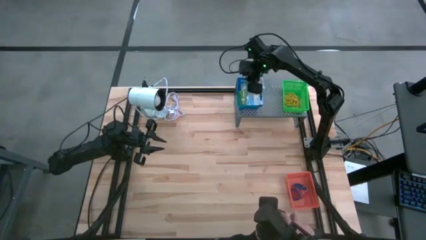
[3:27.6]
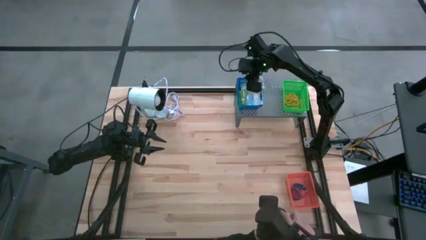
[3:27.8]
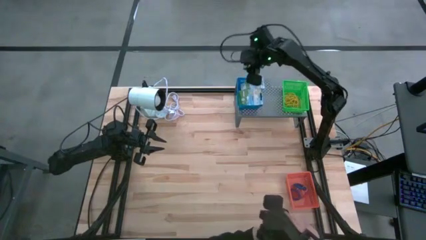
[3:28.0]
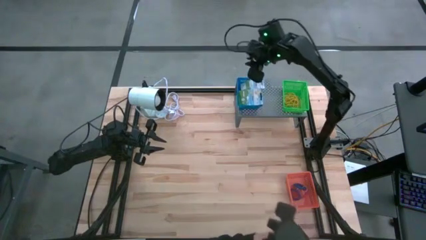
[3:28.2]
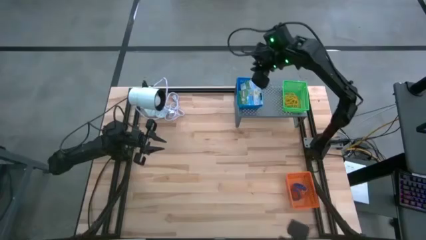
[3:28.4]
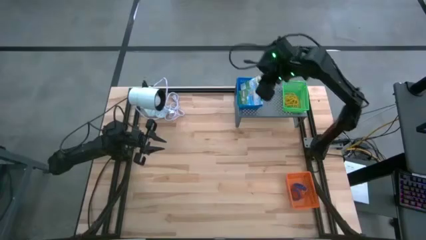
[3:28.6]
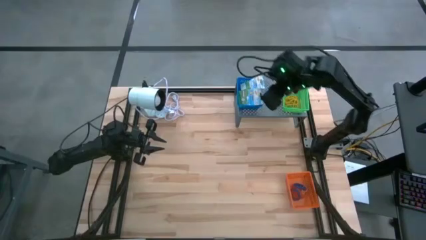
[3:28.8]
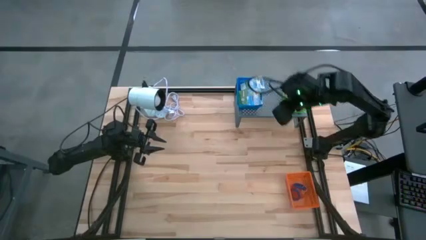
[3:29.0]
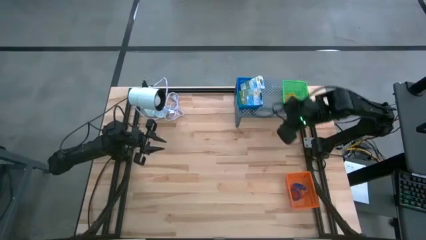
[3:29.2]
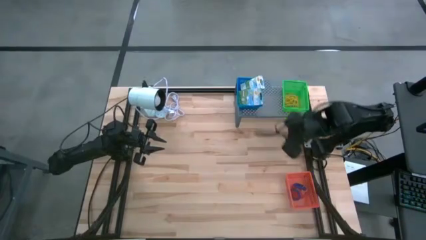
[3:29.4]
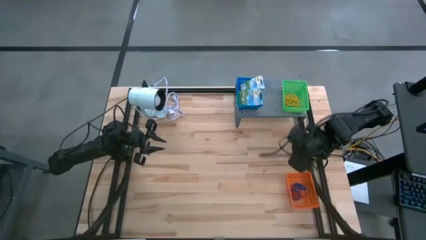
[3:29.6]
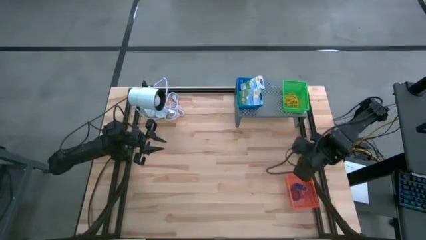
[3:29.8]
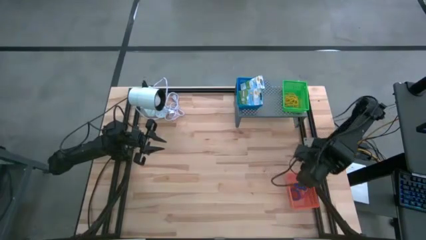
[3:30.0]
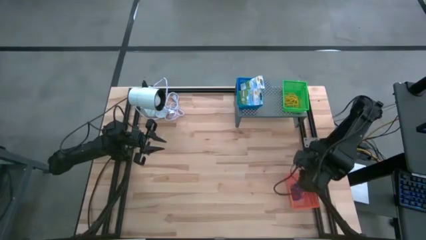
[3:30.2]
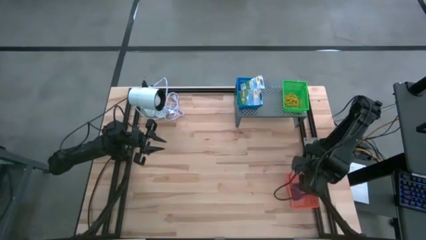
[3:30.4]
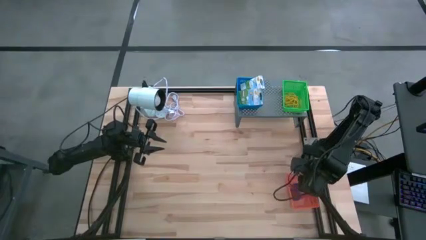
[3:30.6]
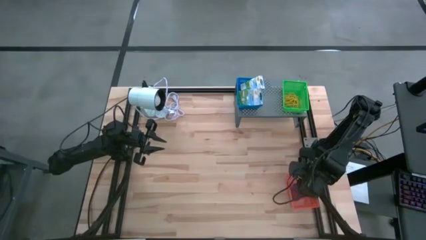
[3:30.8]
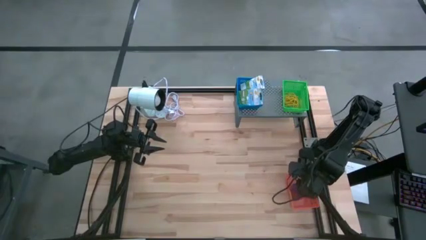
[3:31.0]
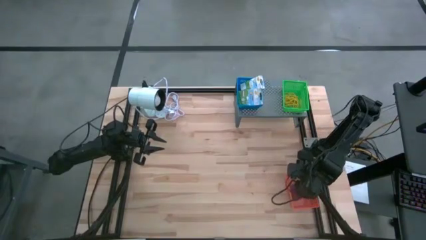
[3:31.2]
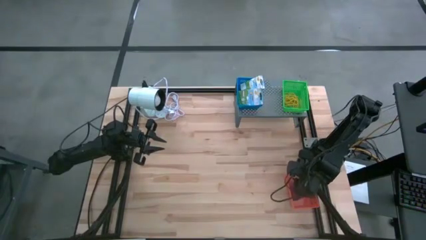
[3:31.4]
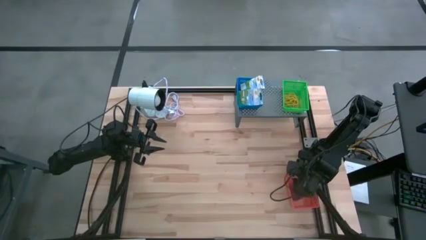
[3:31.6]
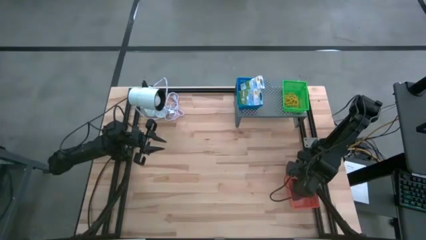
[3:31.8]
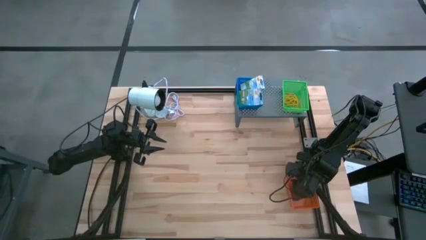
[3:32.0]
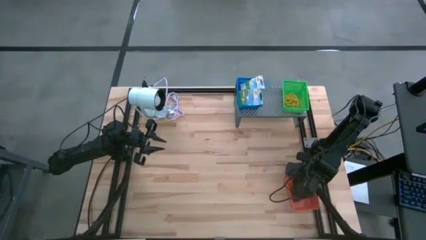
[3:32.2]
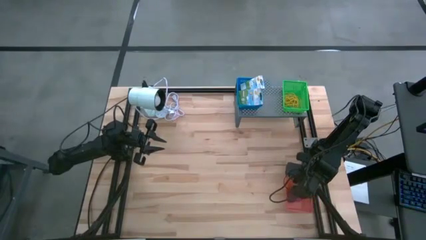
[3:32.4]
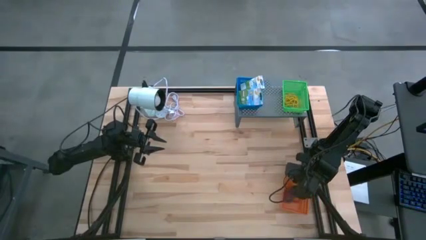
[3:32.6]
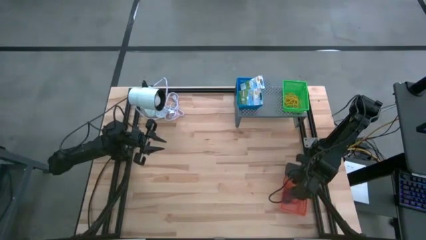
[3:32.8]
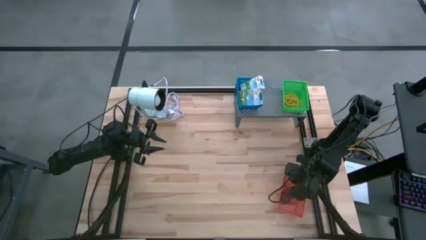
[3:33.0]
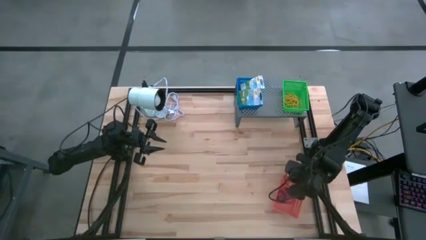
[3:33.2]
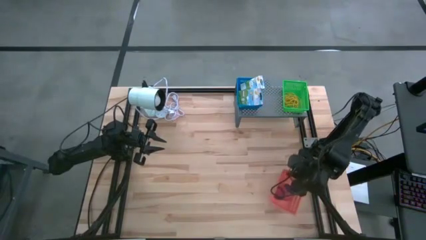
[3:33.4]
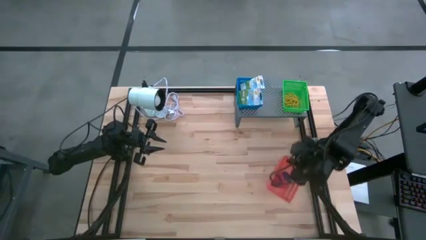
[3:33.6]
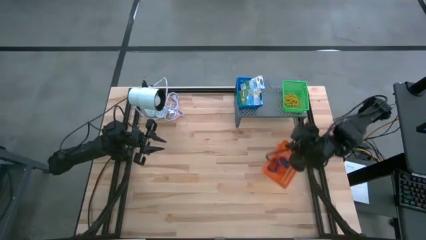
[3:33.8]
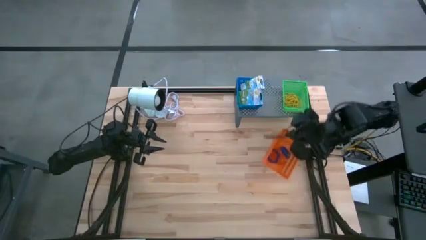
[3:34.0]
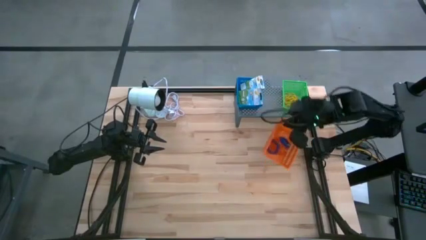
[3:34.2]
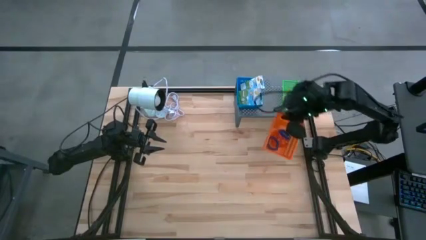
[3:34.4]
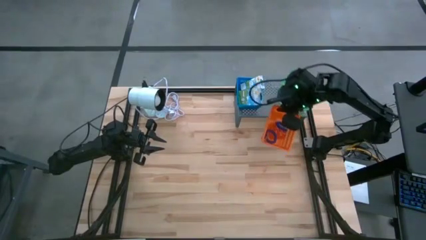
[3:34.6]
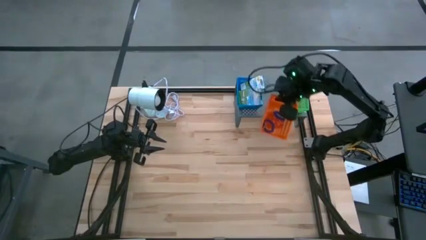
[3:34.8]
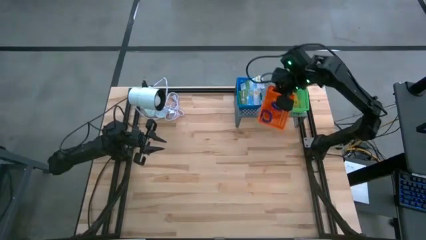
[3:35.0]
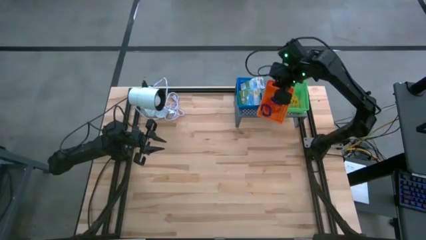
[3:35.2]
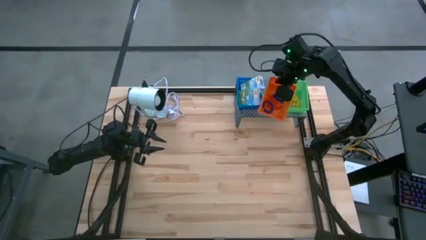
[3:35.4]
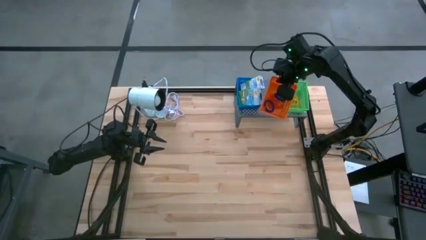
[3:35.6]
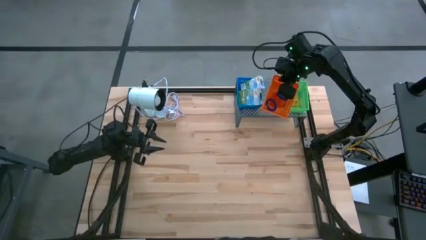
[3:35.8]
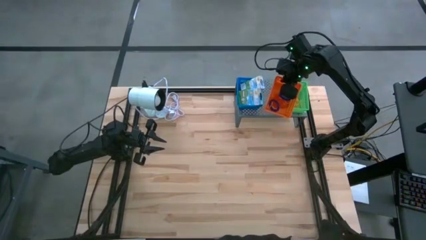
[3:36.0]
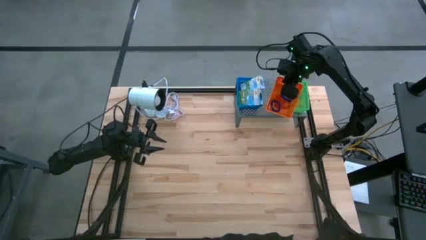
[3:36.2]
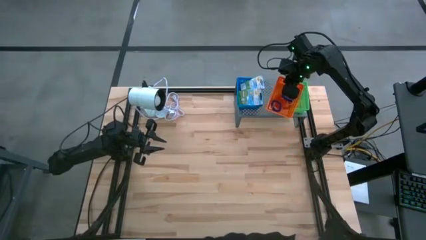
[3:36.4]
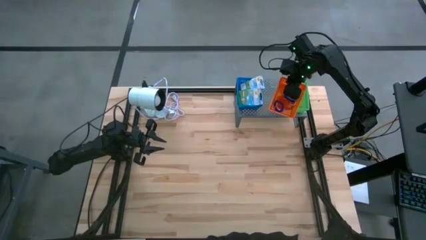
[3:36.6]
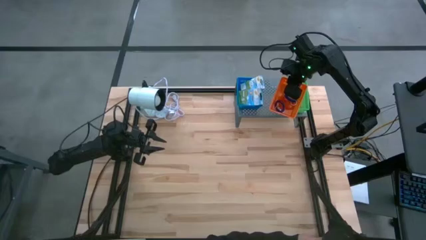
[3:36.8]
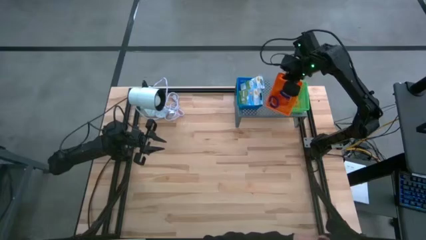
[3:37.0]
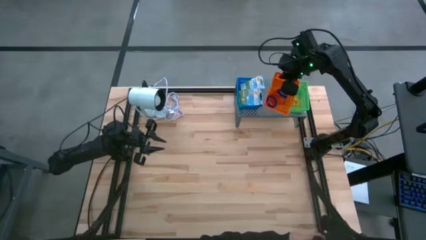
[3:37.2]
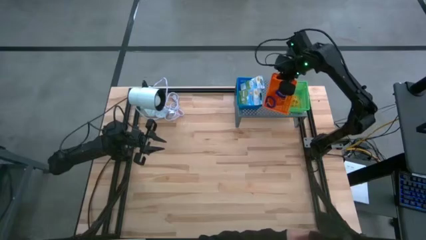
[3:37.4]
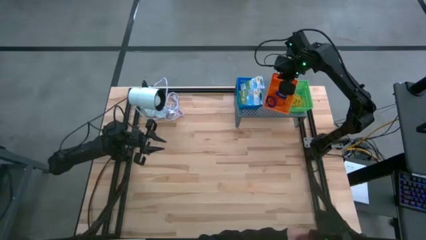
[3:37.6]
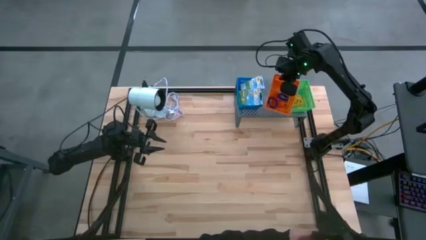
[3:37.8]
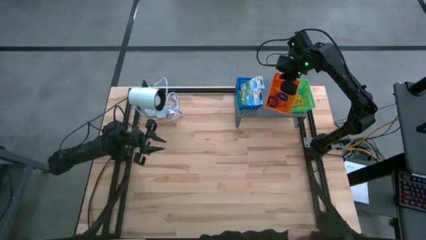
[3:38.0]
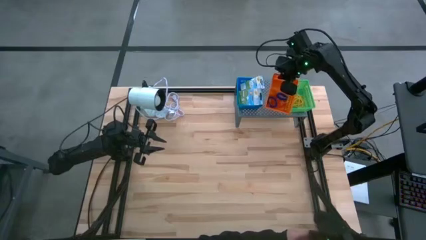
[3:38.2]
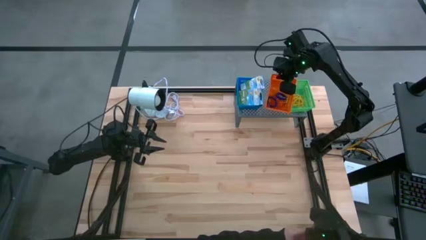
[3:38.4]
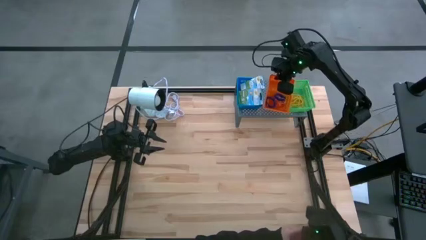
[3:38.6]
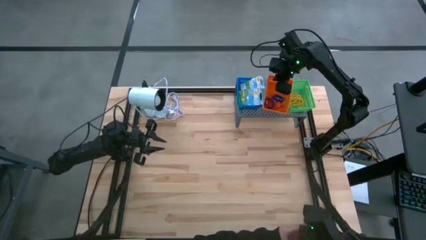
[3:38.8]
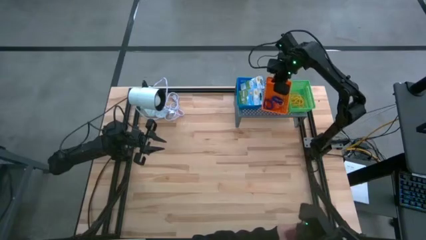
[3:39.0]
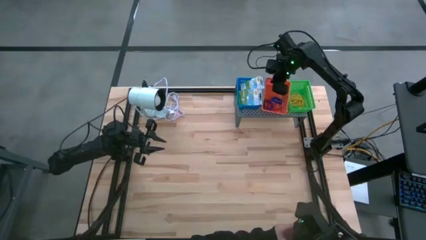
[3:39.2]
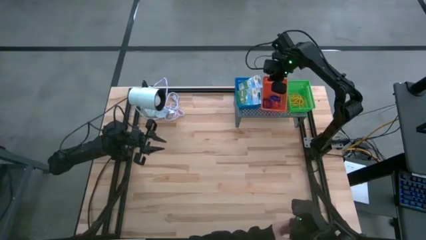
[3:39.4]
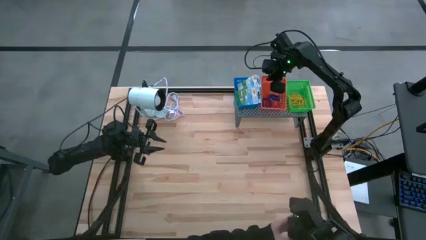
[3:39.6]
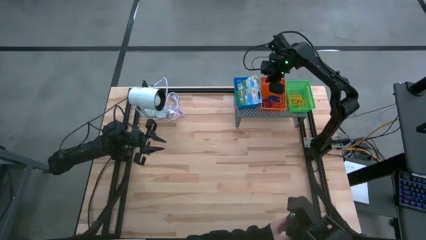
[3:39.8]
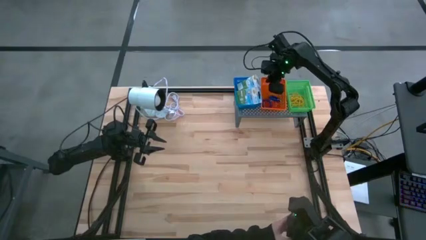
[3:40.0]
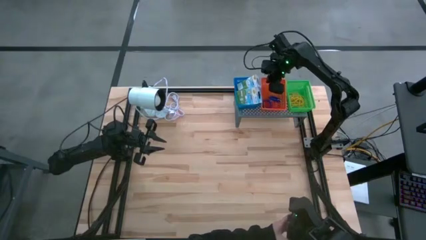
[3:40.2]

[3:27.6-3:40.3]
Task: Pick & Place Office Desk Supplies
Put the orange bin on the shelf

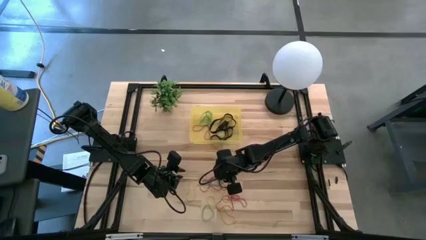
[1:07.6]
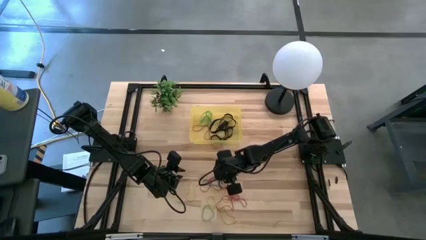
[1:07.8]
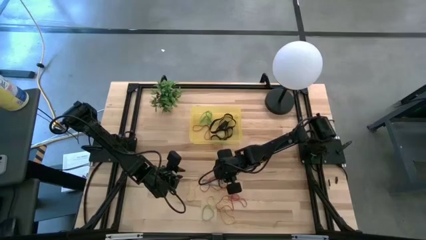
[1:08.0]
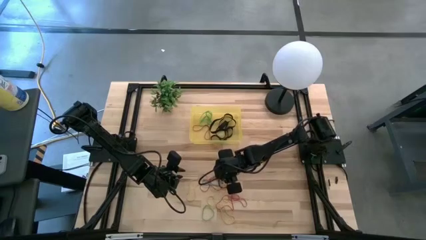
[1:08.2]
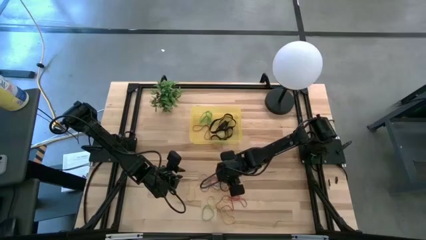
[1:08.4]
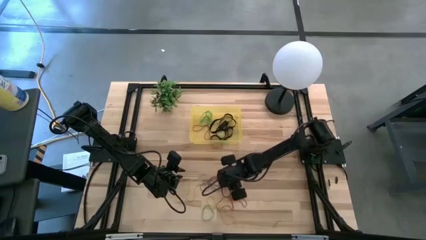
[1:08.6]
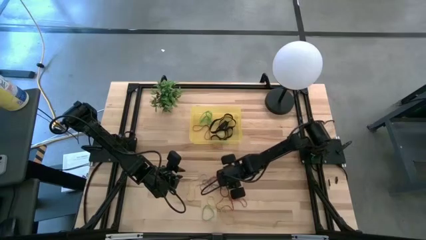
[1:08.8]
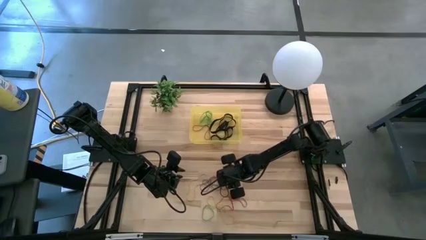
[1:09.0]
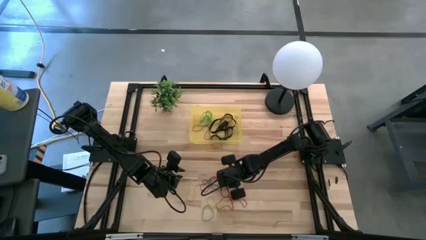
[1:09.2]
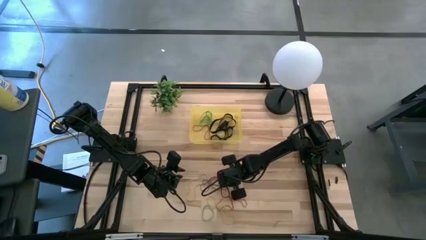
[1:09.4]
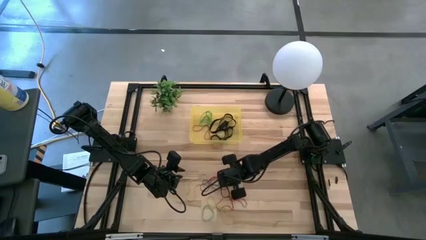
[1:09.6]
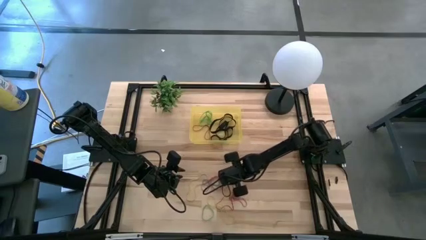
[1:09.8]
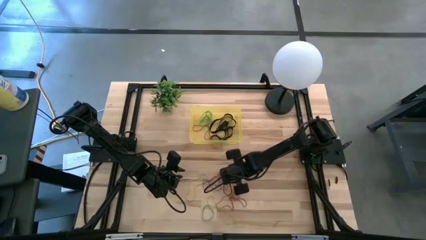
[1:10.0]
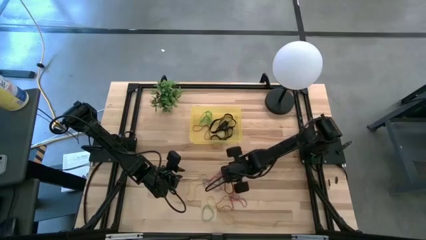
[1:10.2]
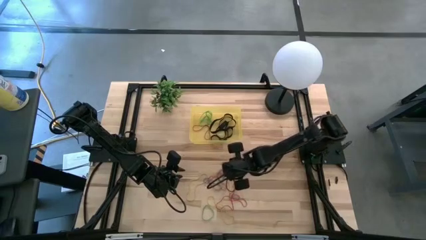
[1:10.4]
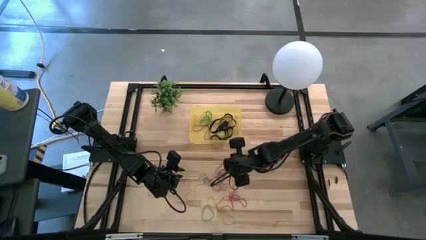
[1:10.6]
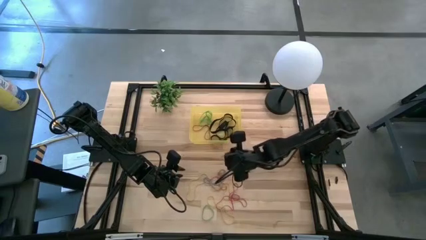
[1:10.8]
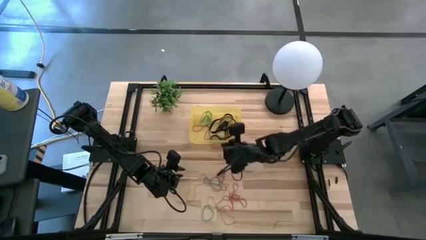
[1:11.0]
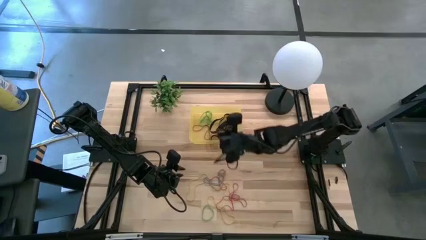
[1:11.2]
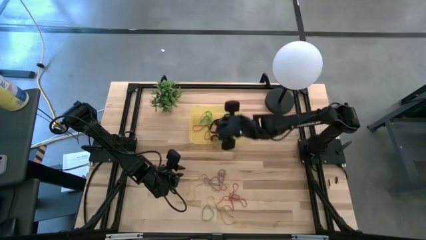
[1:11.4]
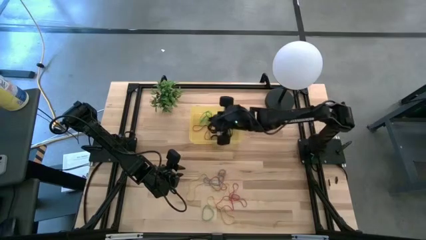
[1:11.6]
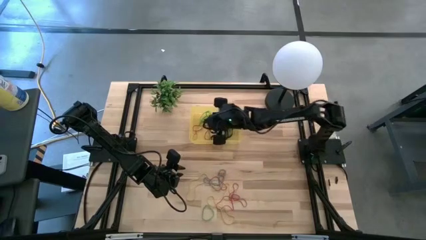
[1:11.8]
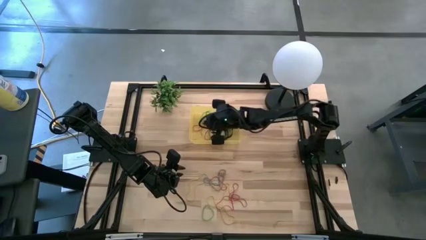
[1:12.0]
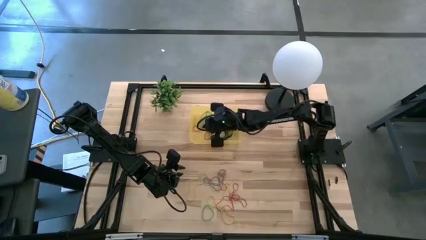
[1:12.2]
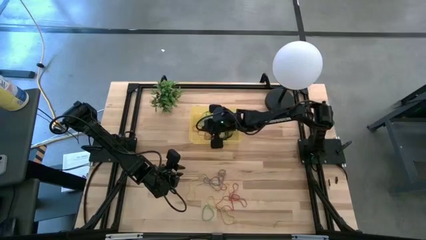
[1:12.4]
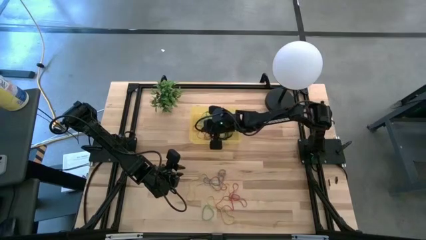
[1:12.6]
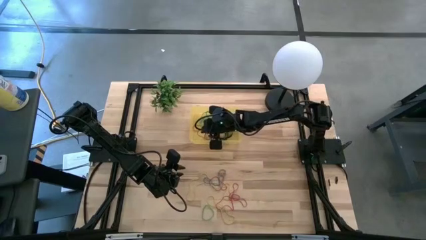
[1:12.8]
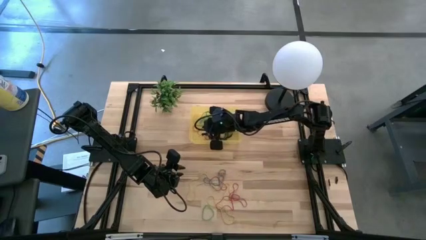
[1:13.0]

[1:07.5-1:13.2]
Task: Pick and place rubber bands into bin
Put the red rubber band into the yellow bin
